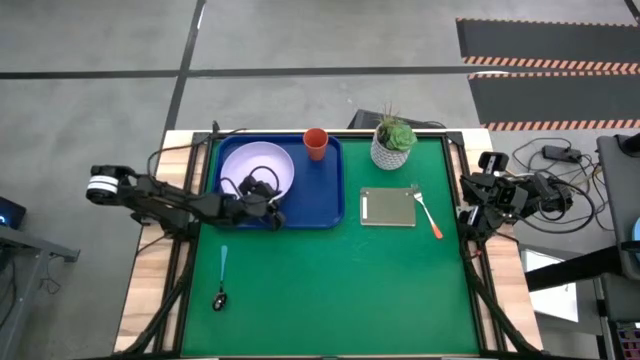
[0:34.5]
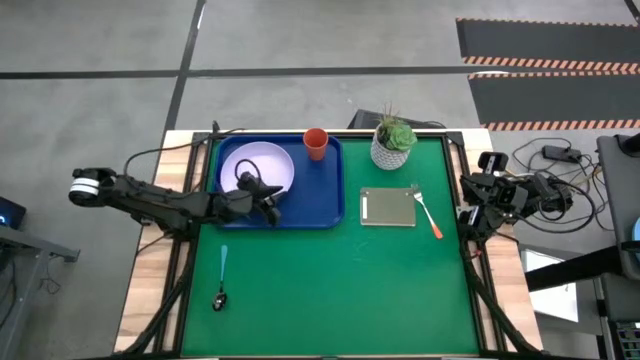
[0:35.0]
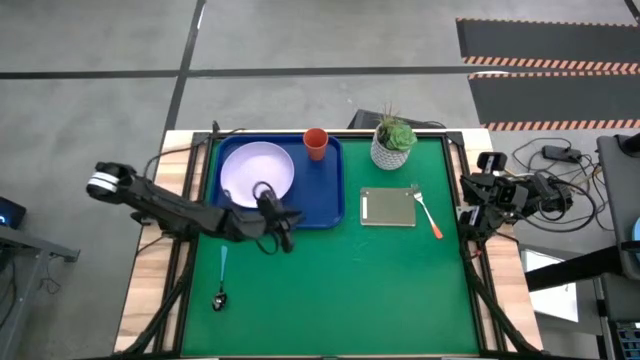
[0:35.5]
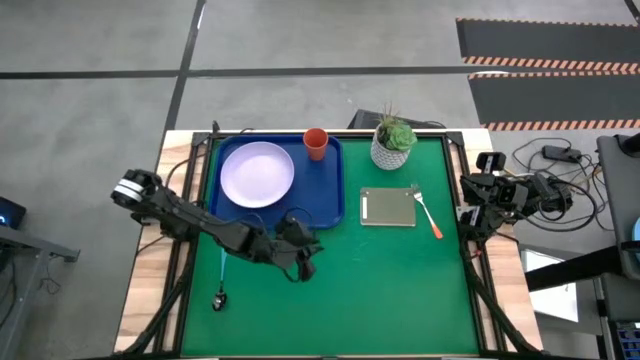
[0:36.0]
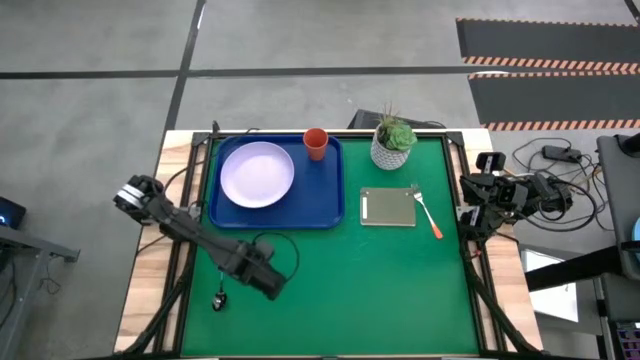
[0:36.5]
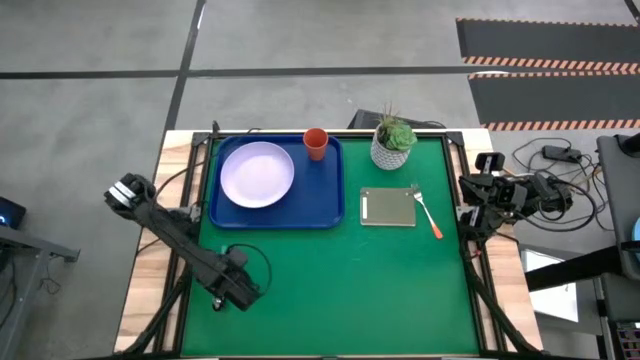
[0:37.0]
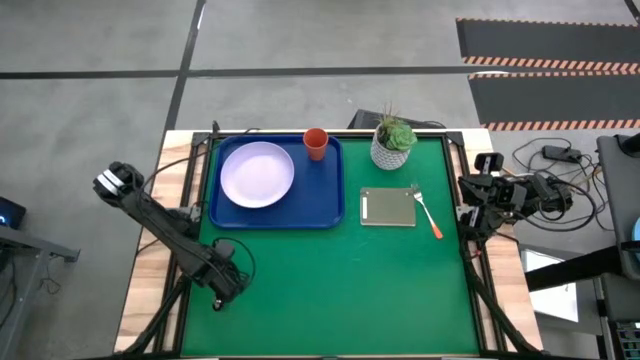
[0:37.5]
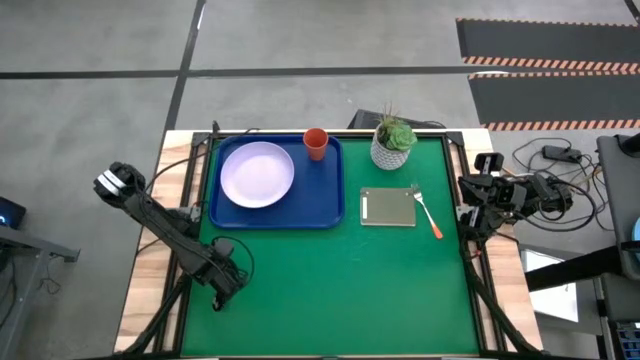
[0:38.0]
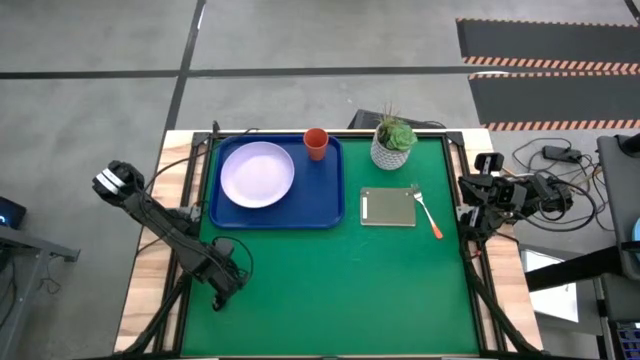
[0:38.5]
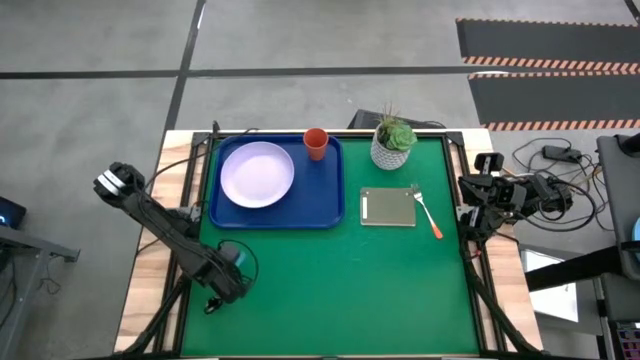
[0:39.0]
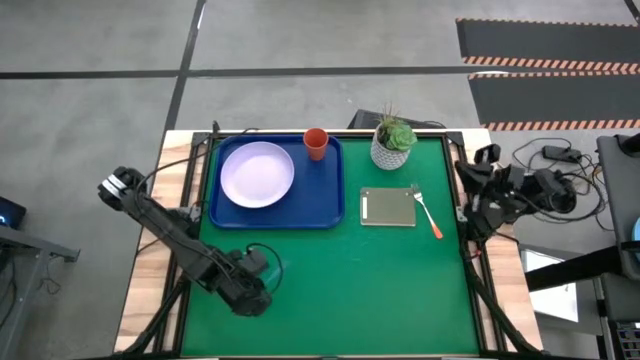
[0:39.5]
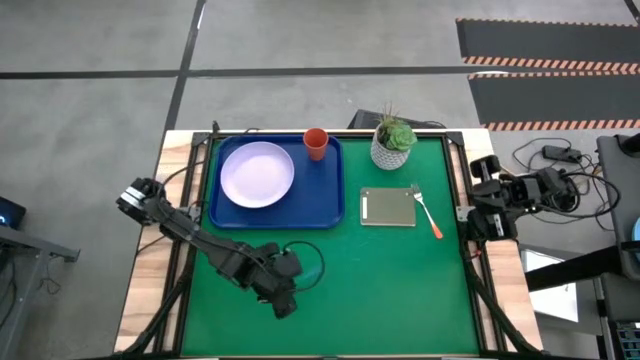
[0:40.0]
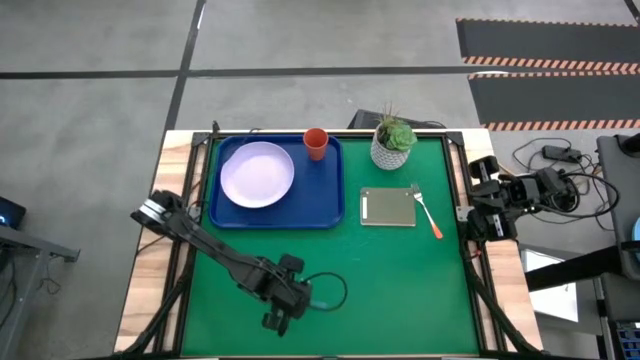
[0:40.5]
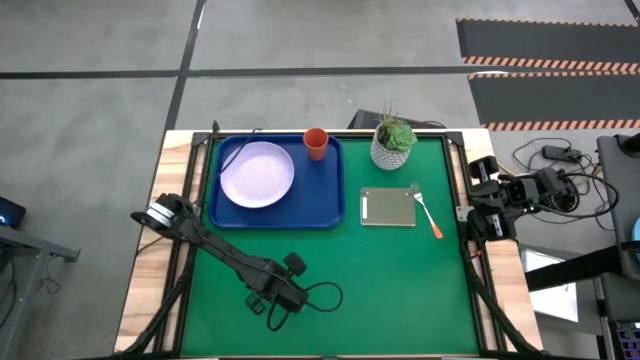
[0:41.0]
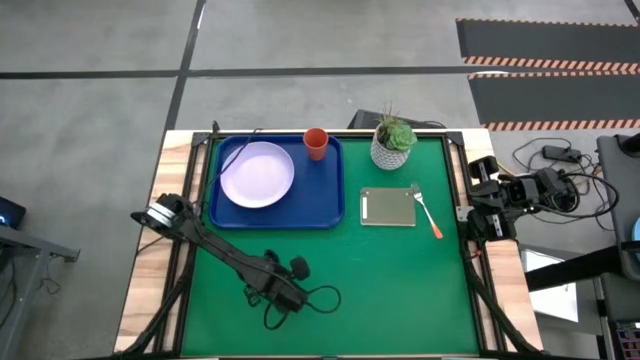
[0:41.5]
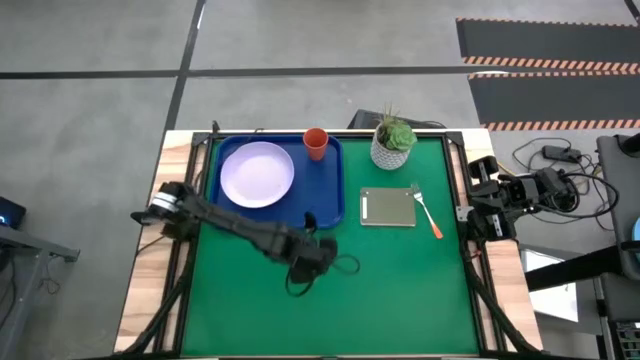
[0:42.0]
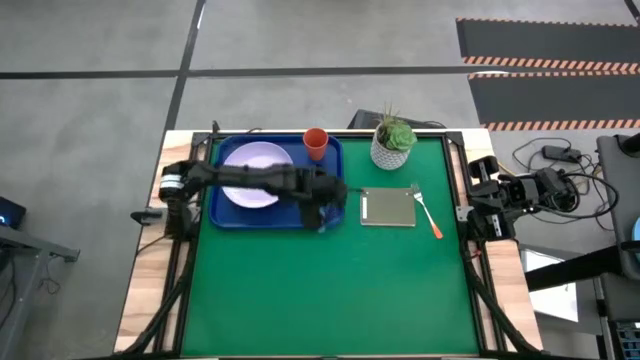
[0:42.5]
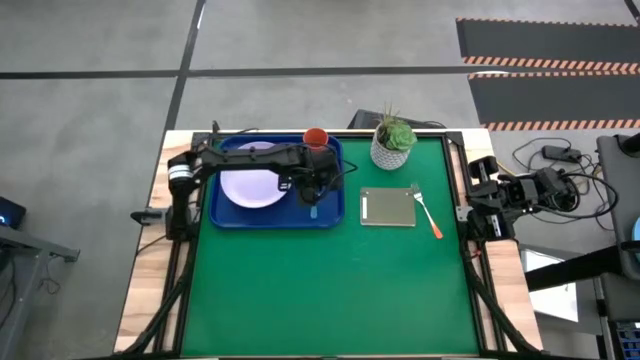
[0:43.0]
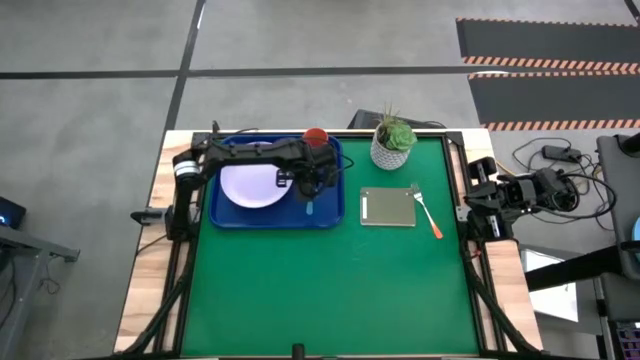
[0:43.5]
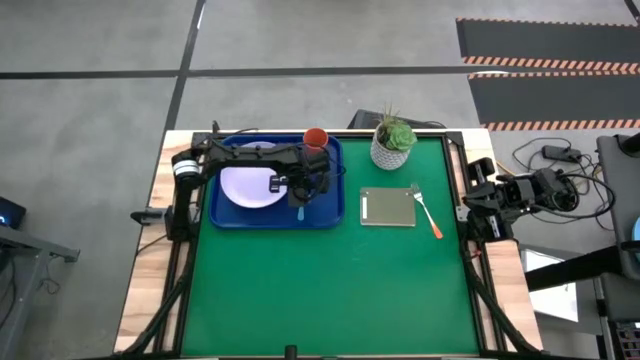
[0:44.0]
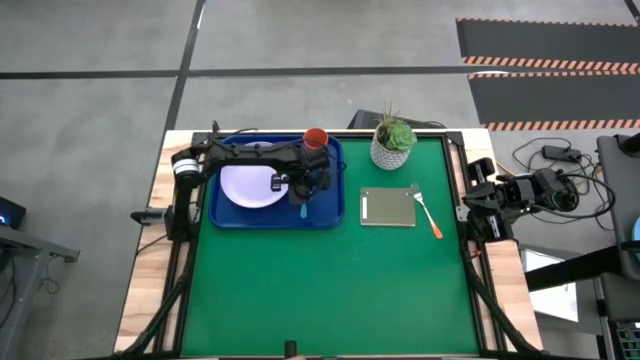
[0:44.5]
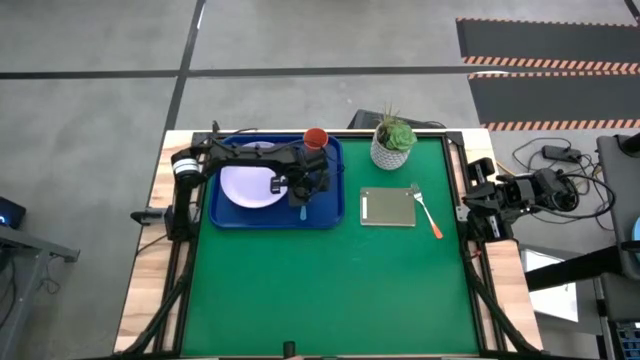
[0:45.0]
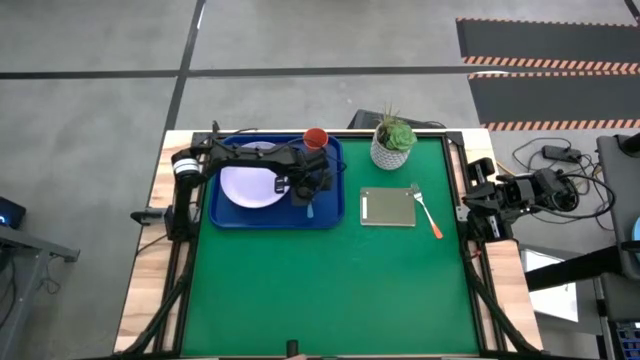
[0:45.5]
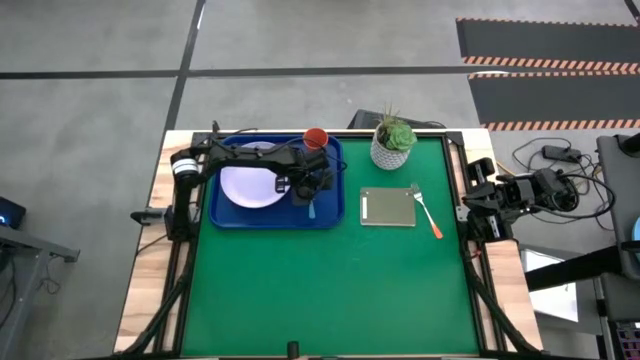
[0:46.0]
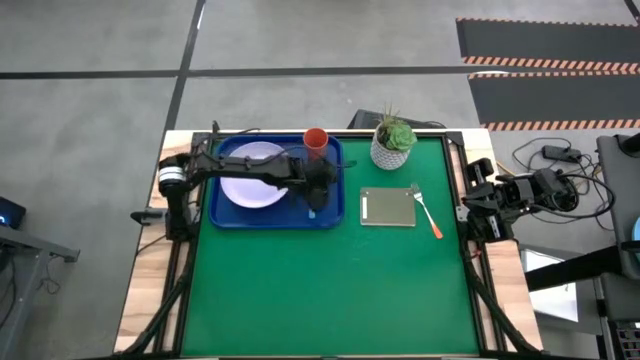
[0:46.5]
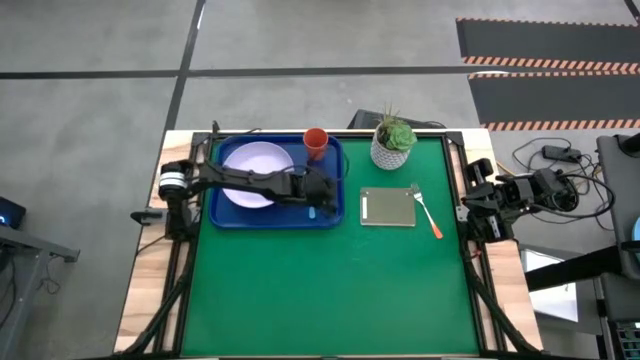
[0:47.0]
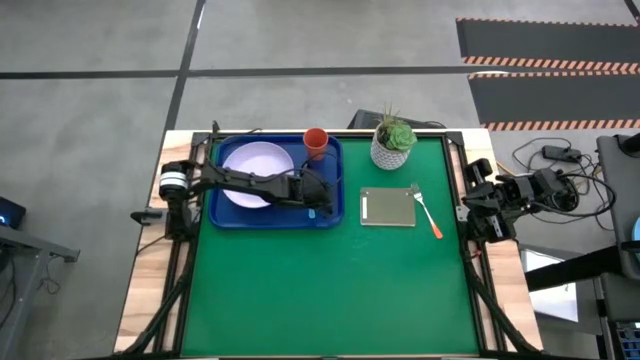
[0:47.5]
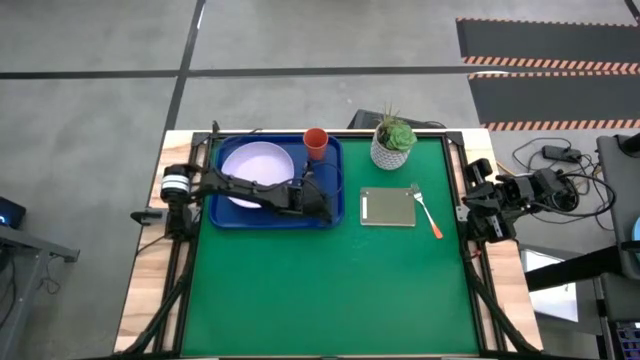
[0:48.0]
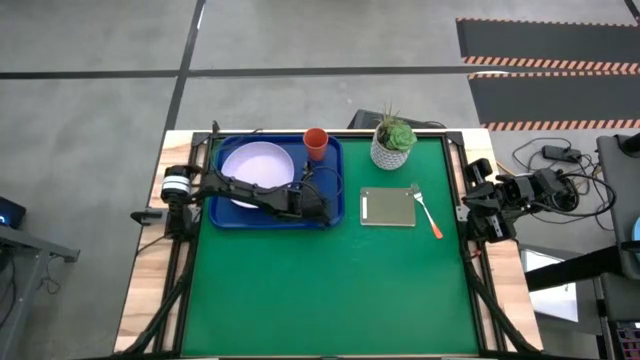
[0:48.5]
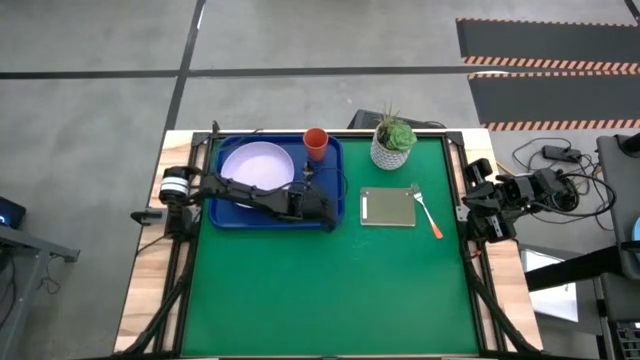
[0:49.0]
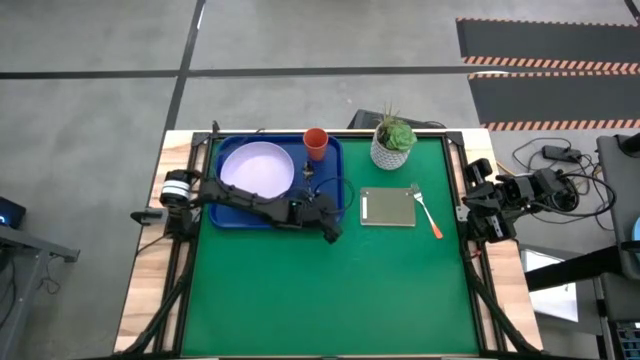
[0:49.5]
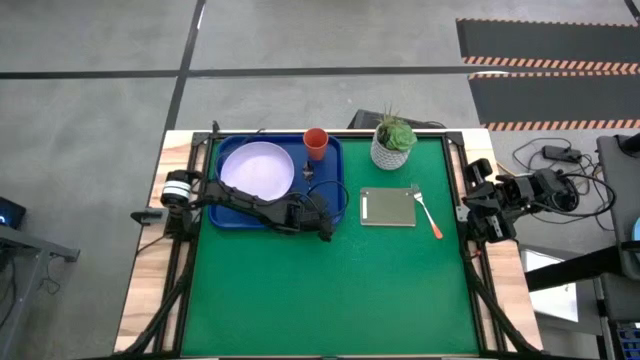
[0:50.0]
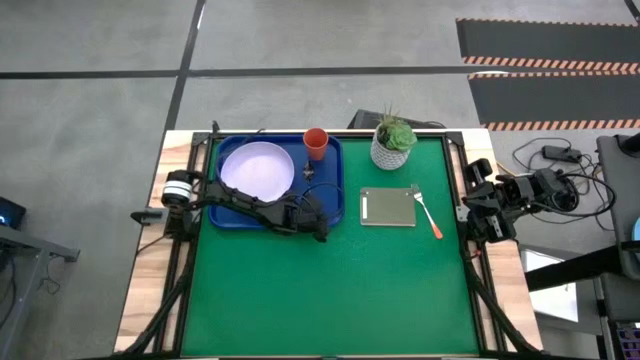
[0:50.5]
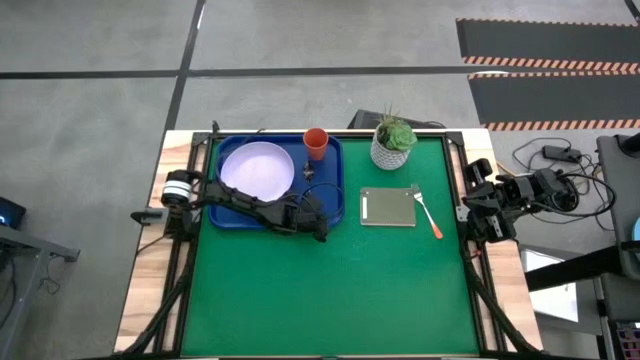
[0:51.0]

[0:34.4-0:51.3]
Task: Pick and place plate/cup/fork/spoon on tray
Put the blue spoon to the right side of the purple plate on the dark blue tray

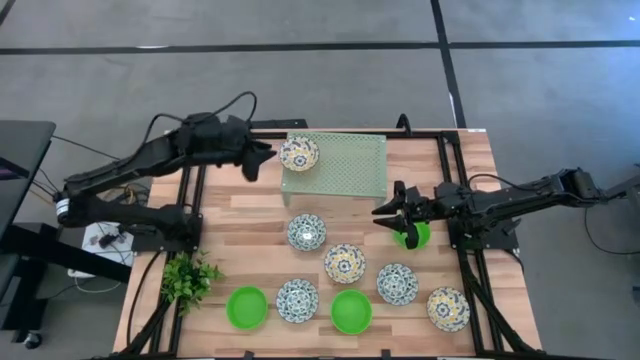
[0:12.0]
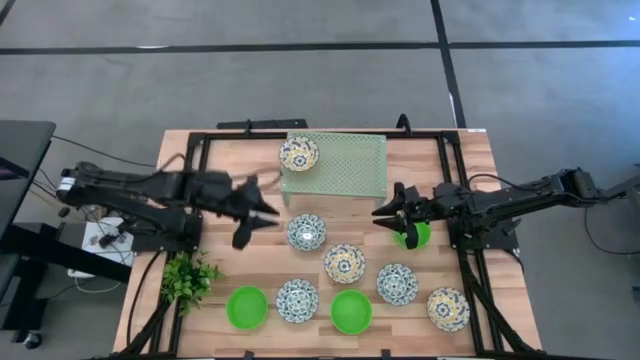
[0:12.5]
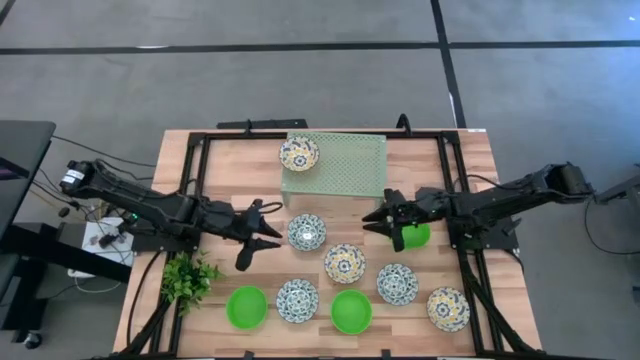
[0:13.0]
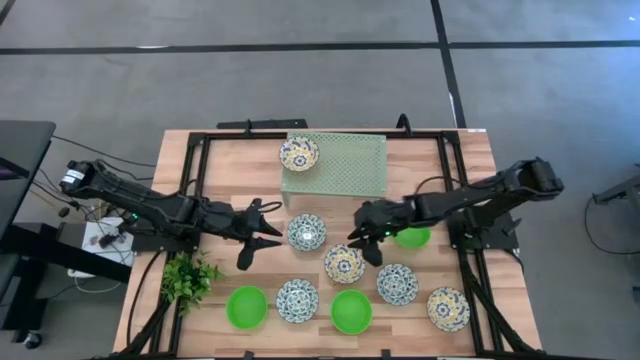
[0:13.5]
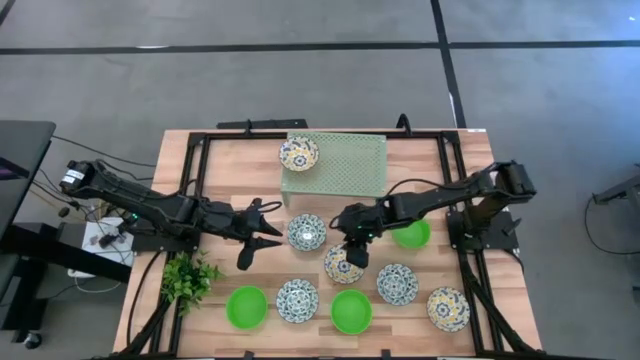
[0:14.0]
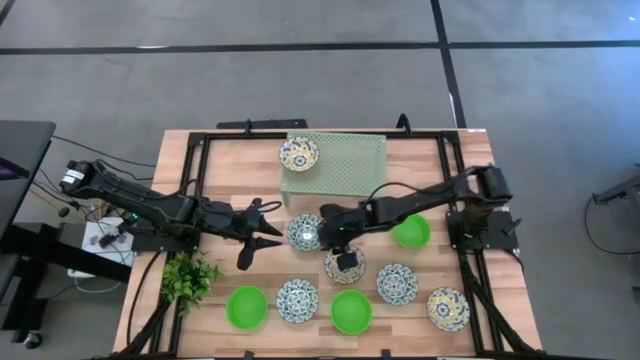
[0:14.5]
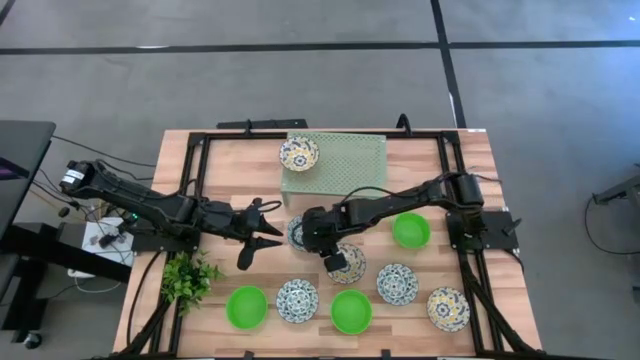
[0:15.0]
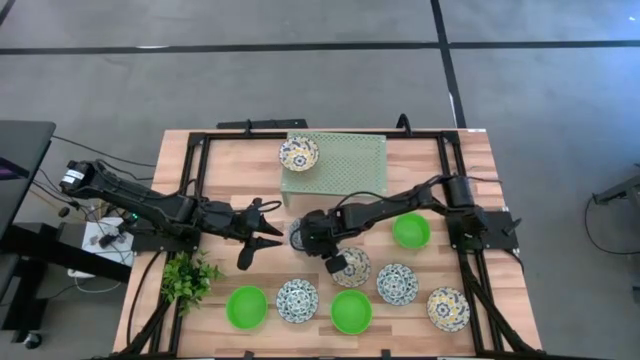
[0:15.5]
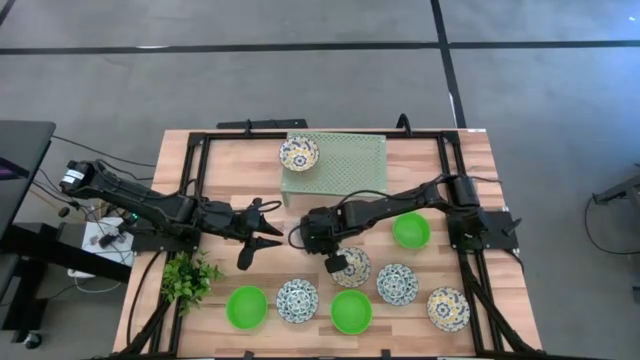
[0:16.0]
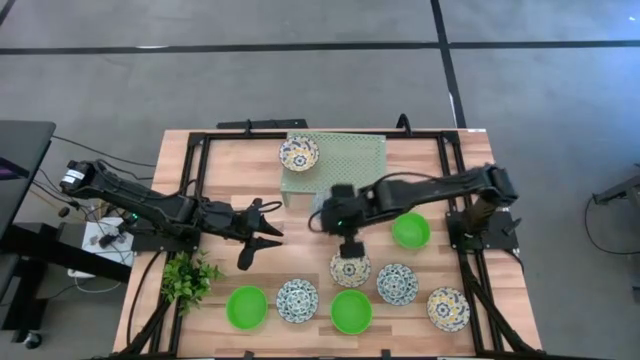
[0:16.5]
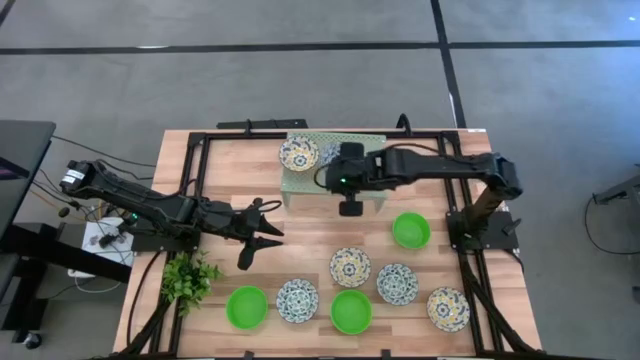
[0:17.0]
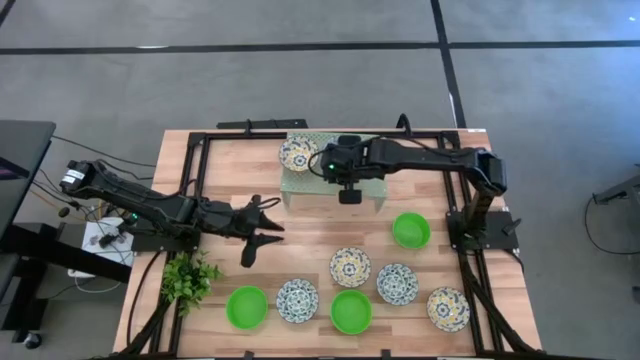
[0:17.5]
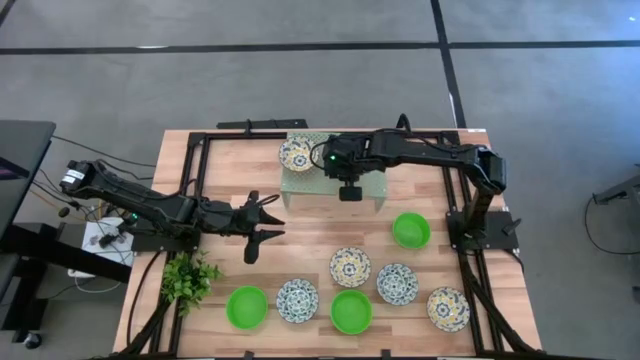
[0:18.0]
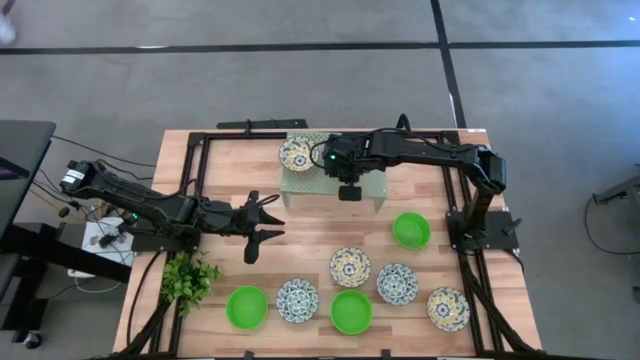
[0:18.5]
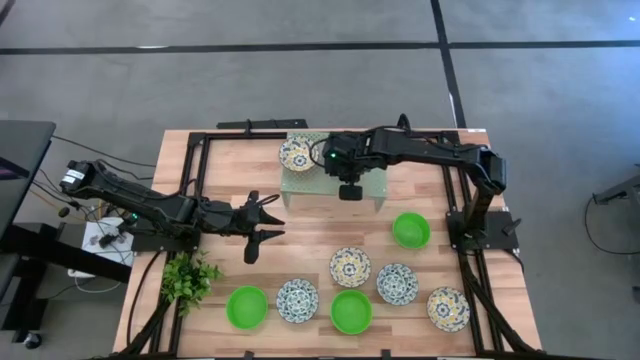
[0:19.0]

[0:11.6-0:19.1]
Task: Pick & Place Mini bowls
Put the top blue patterned bowl on the shelf
